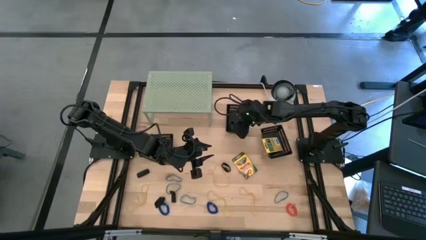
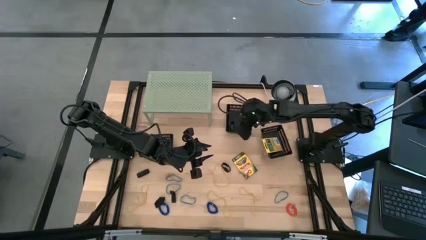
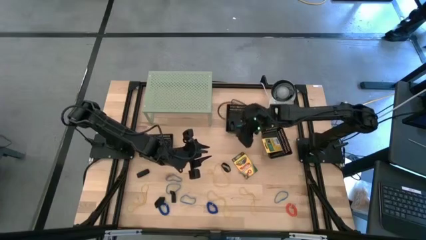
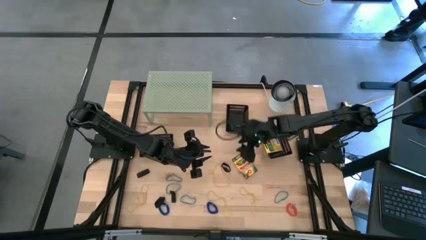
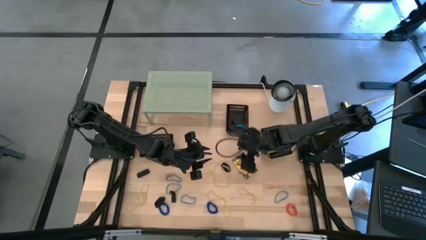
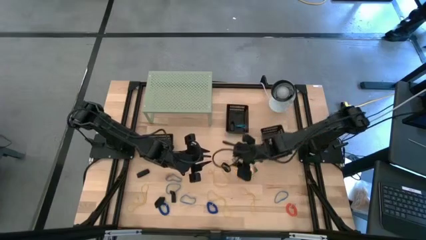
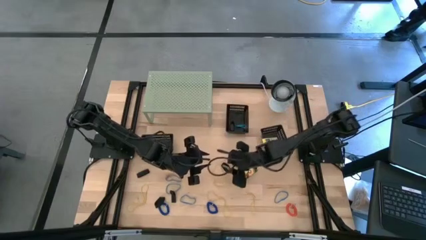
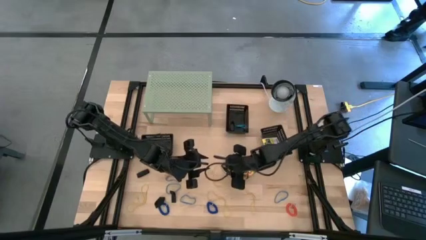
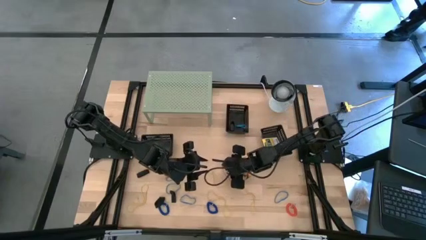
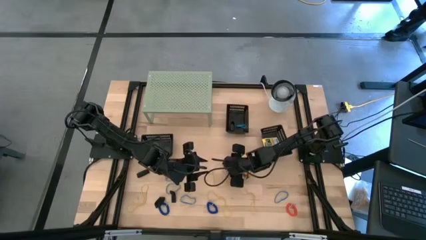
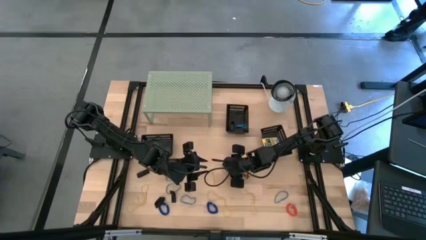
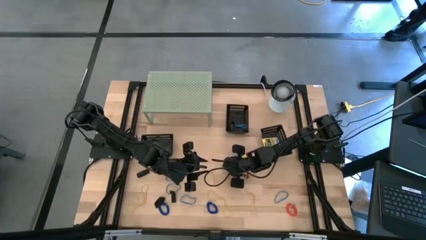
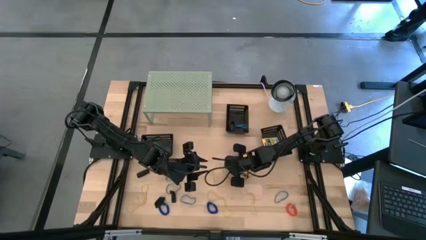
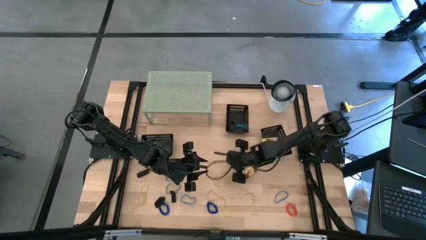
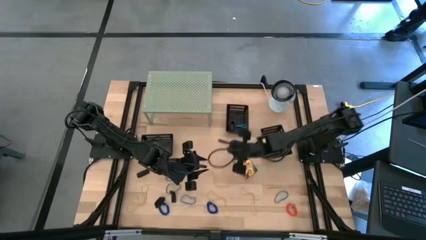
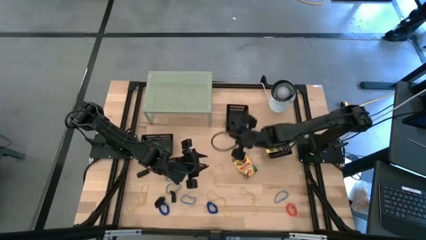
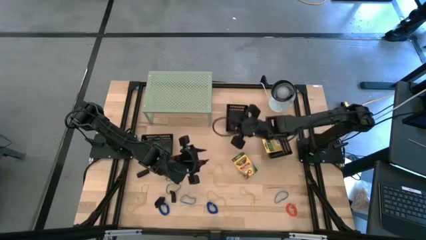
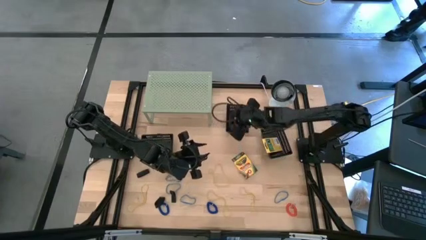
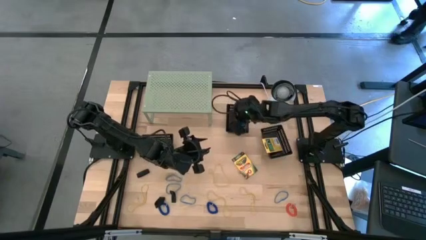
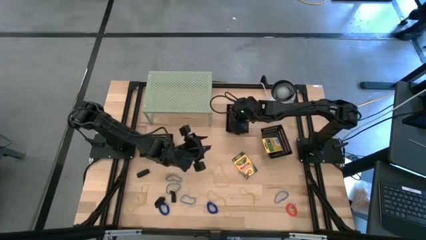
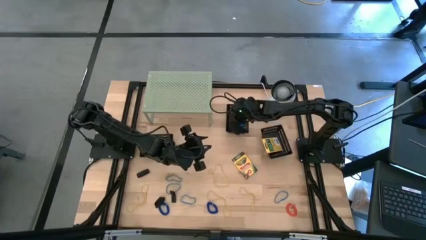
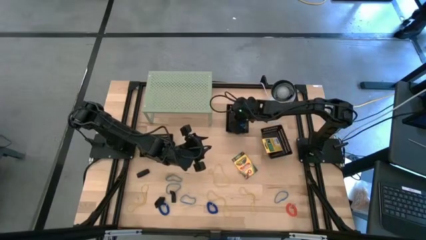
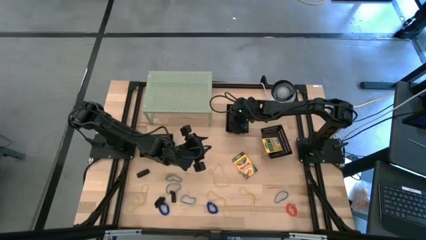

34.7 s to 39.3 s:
Task: Pick & Place Office Desk Supplies
Put the black rubber band into the top black bin

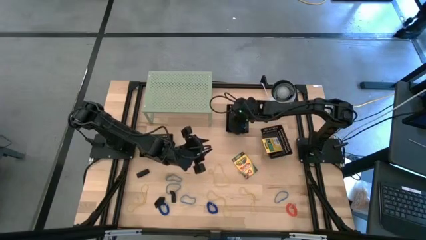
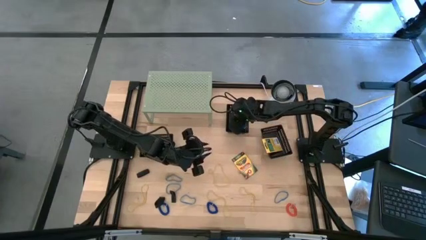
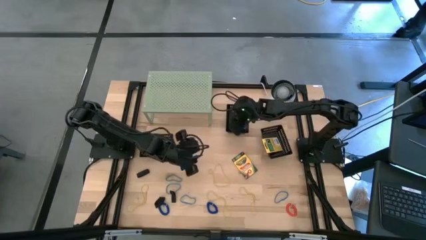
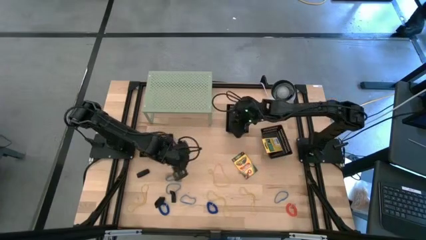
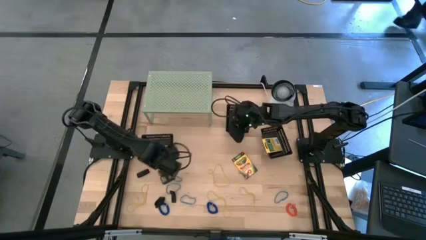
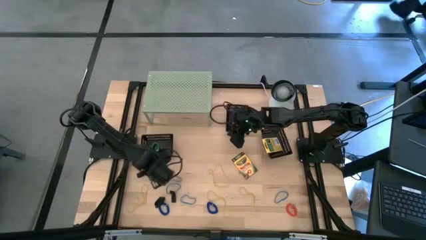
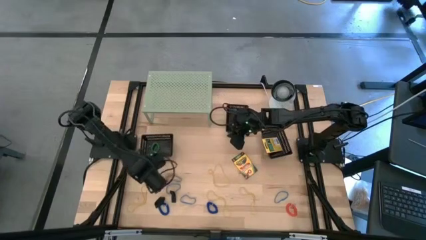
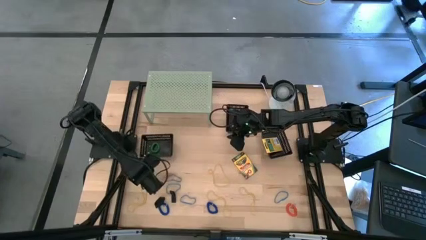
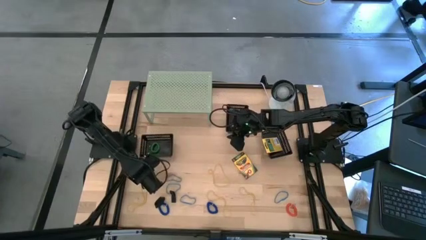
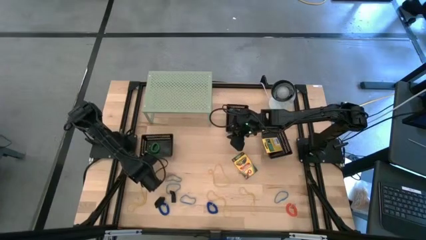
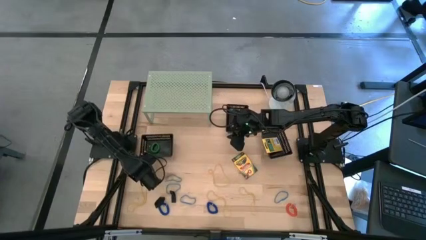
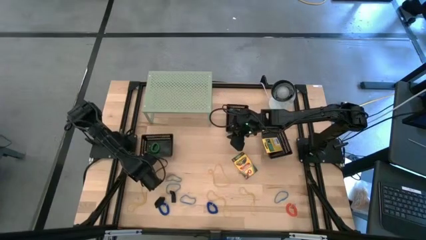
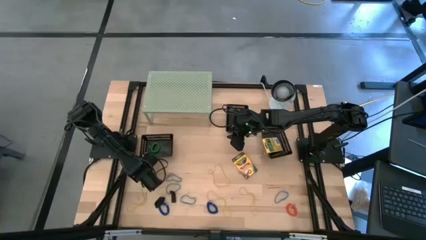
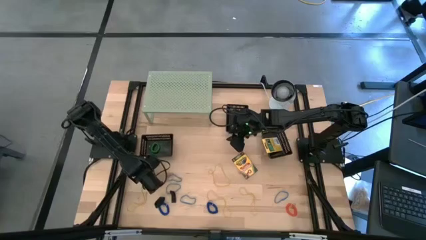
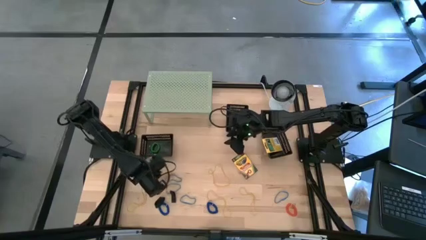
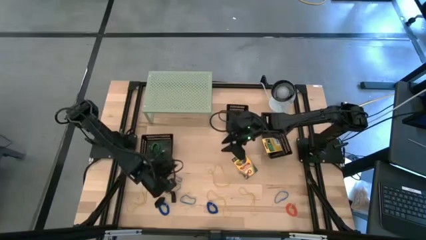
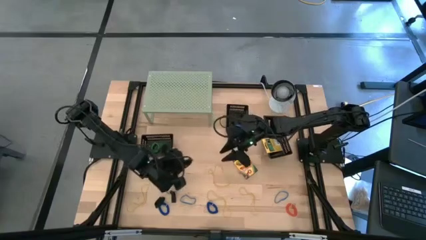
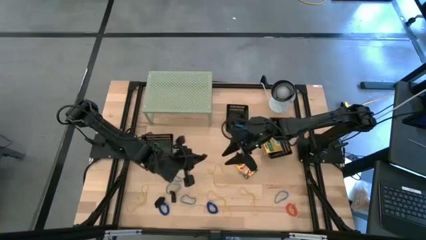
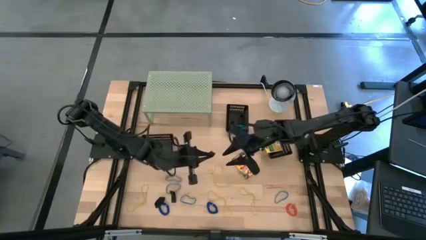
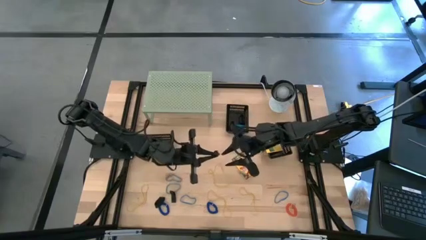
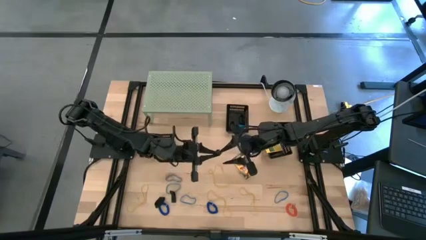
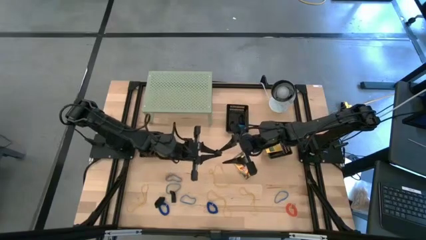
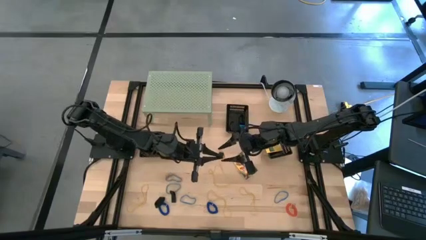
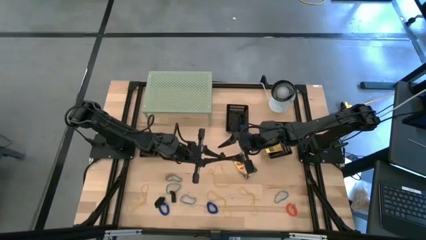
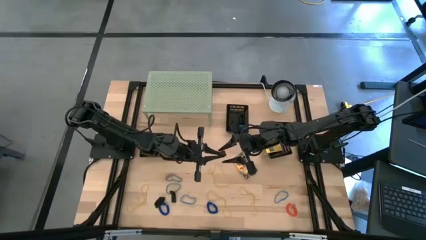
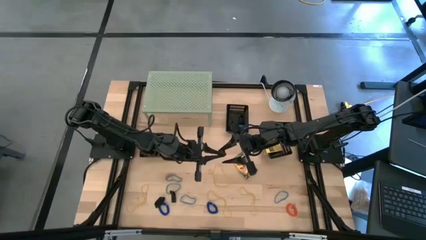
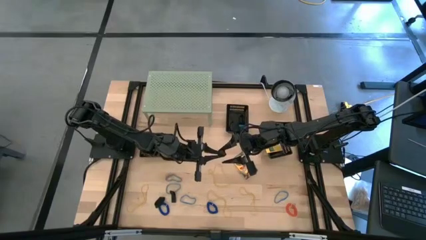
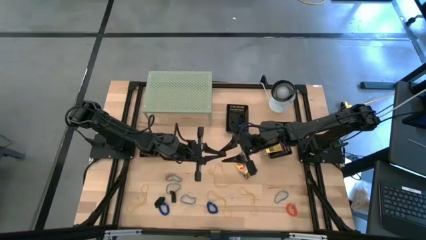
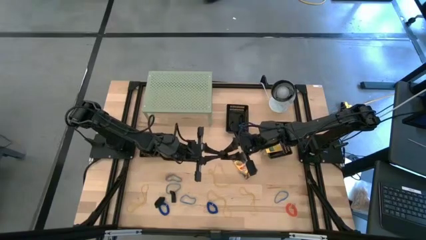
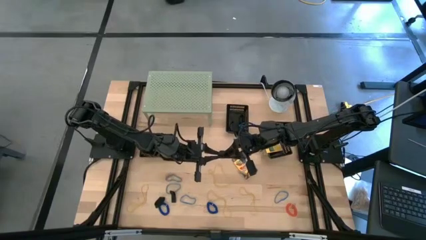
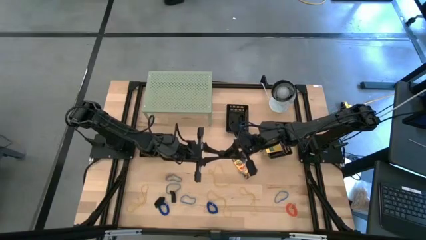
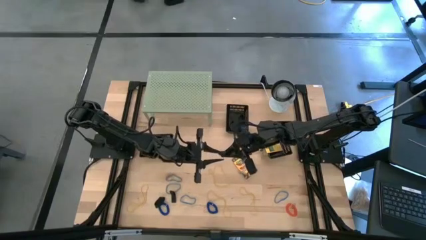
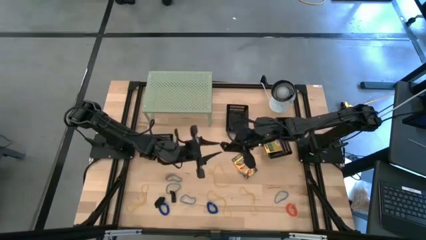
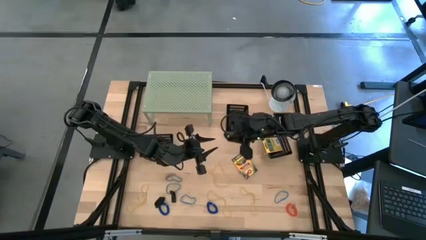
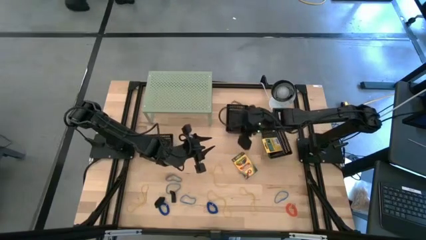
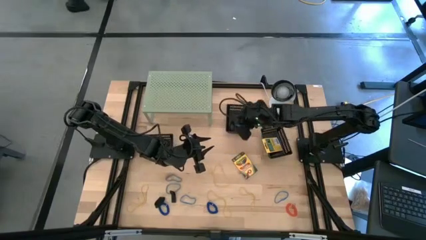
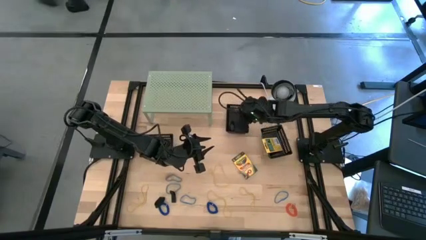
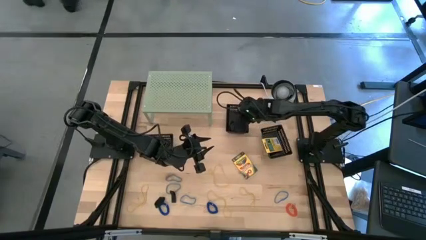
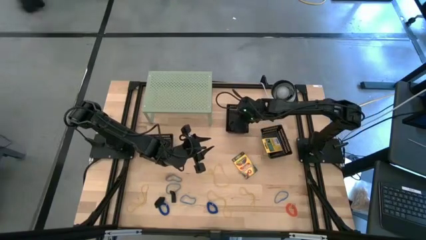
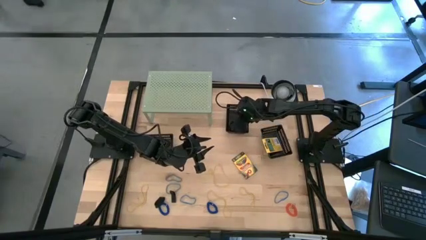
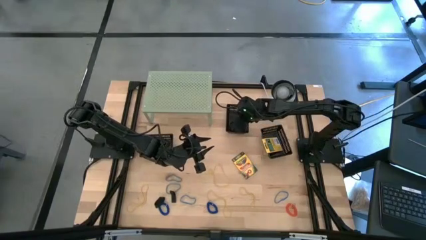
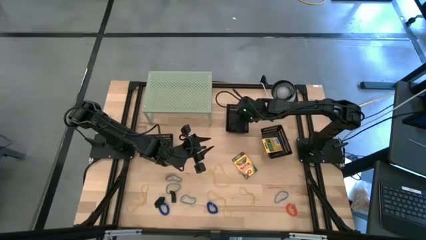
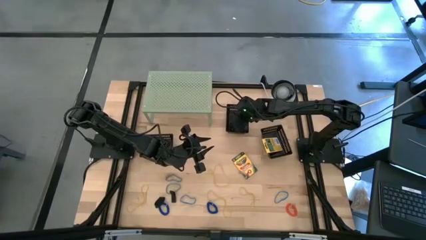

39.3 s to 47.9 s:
Put the black rubber band into the top black bin

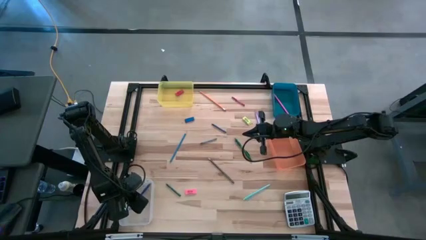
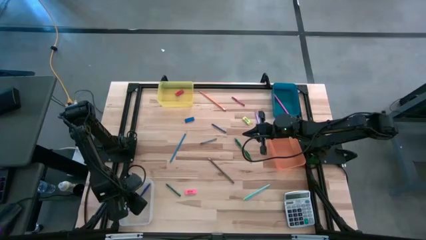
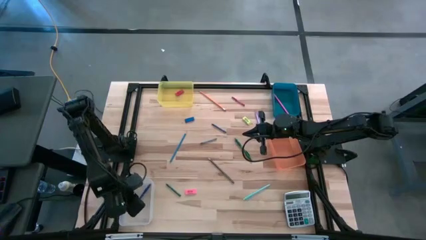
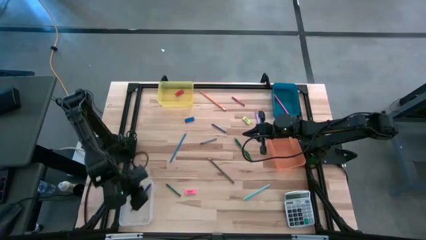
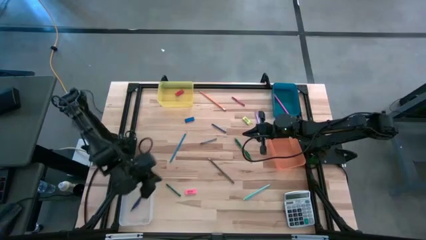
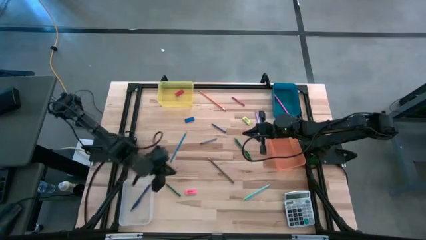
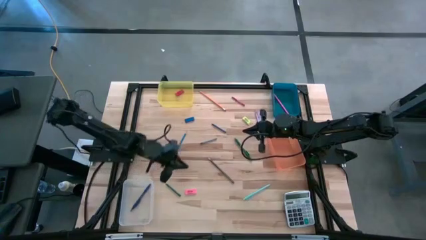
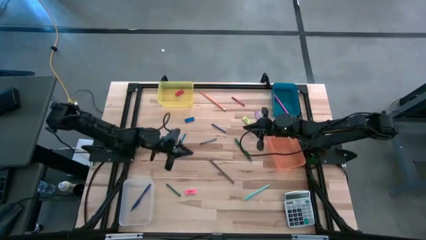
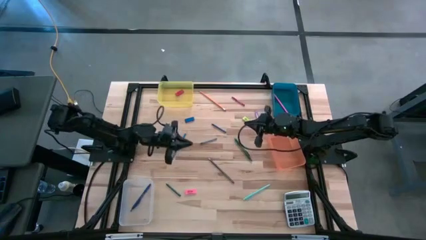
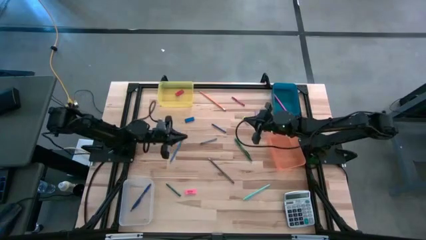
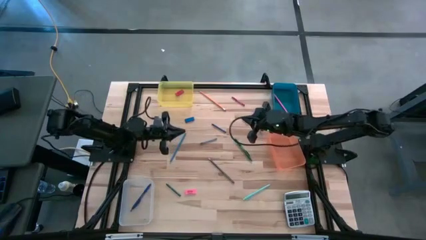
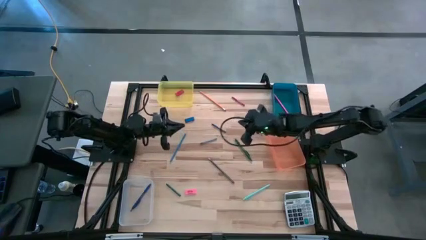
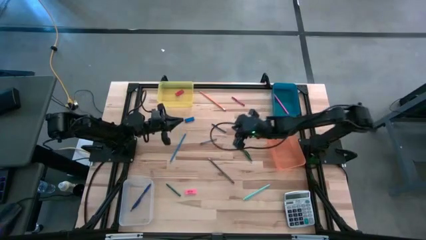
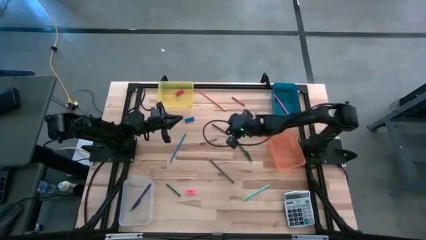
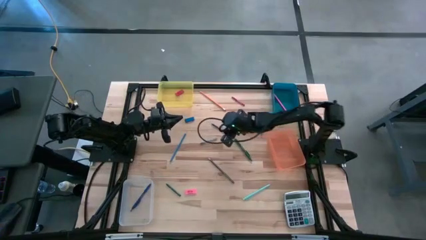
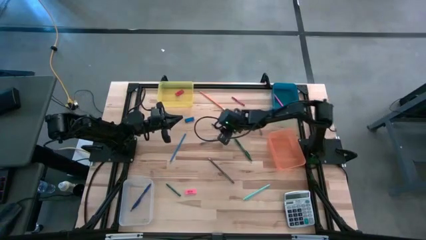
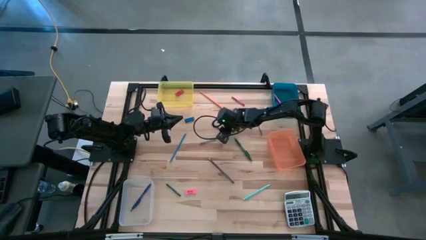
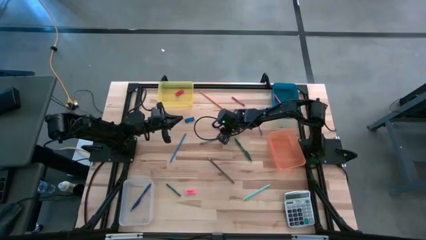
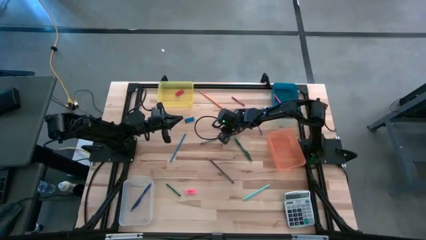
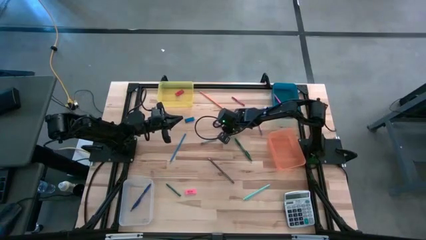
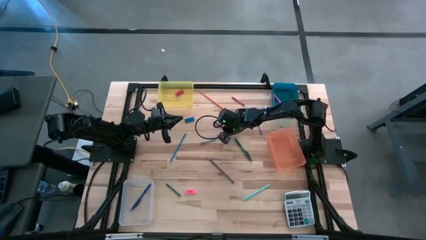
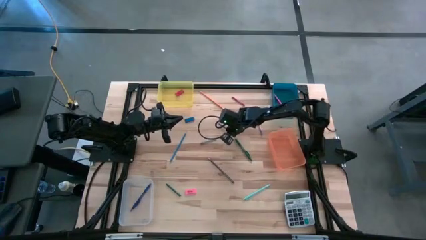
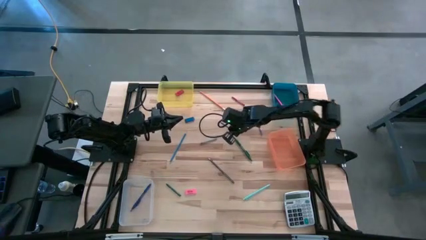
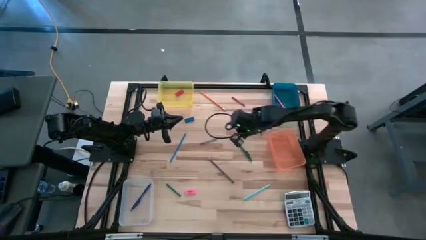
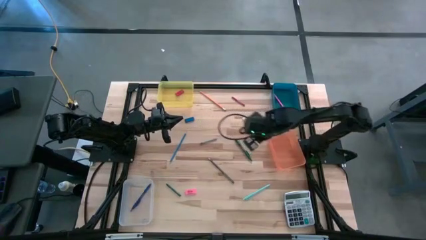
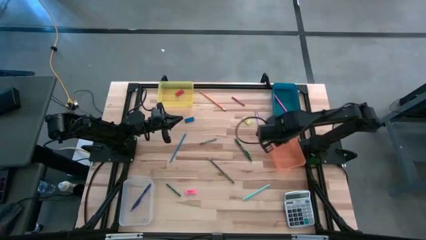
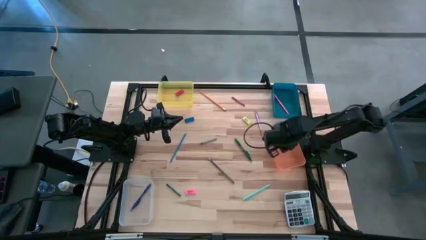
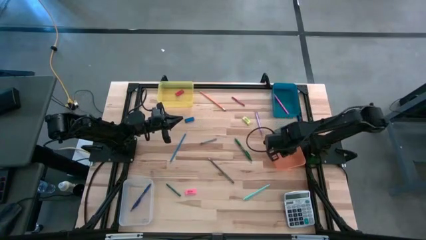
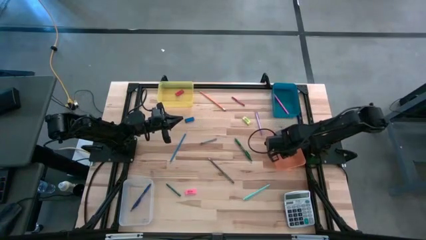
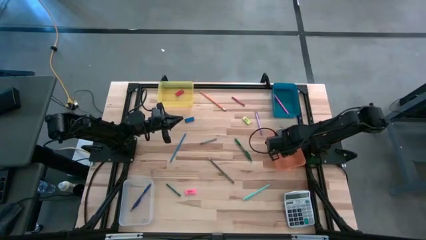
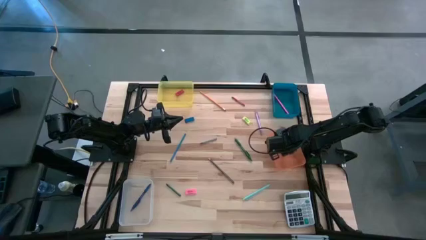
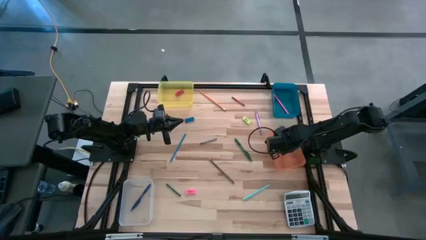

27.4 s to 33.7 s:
Task: Sort crayons/erasers/pens/pencils in bins
Put the blue crayon into the orange bin
